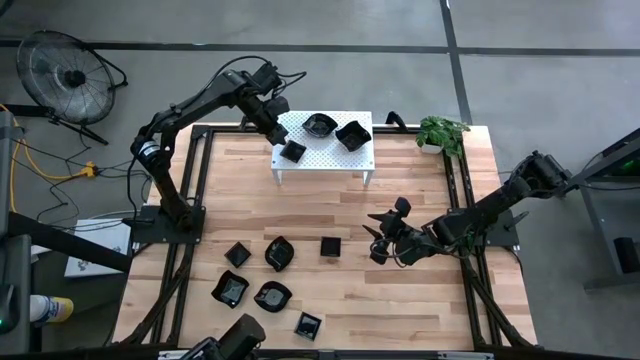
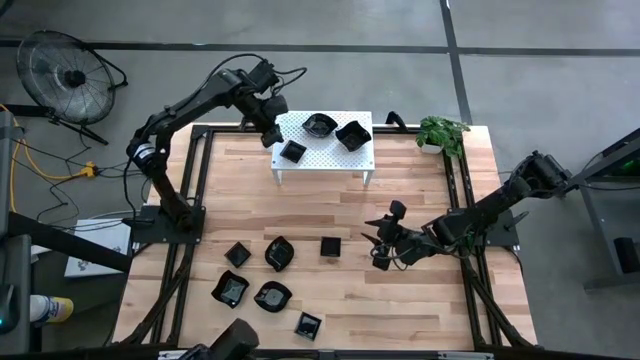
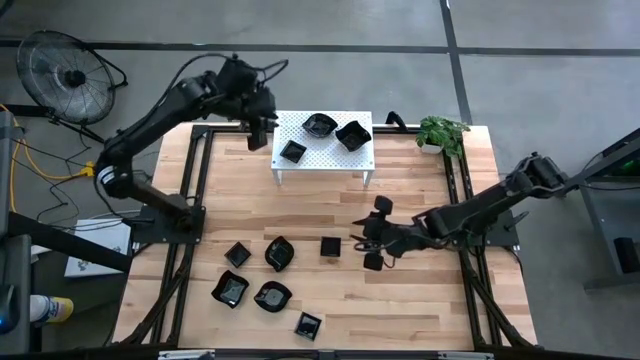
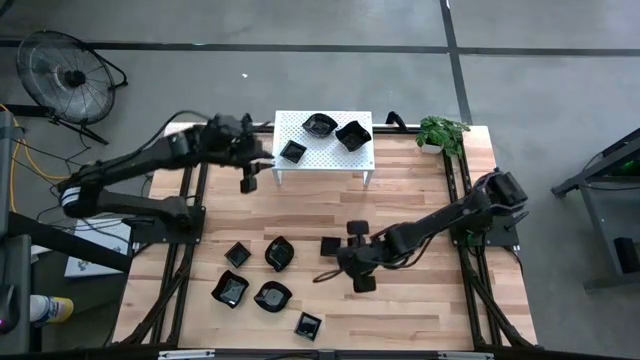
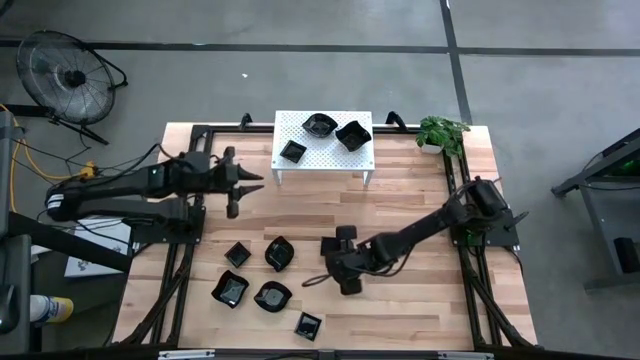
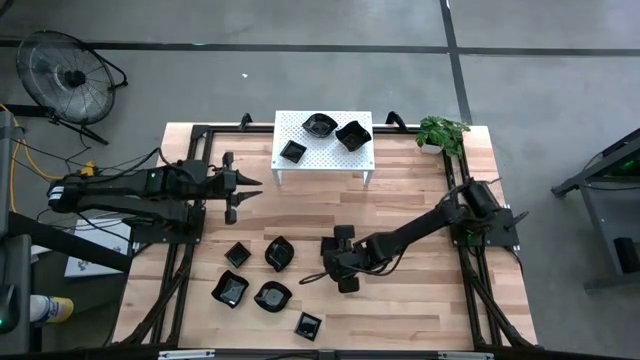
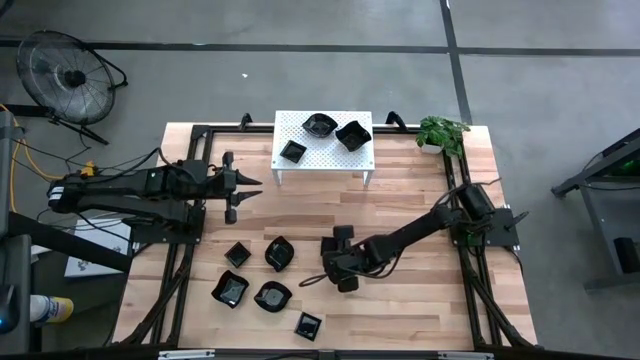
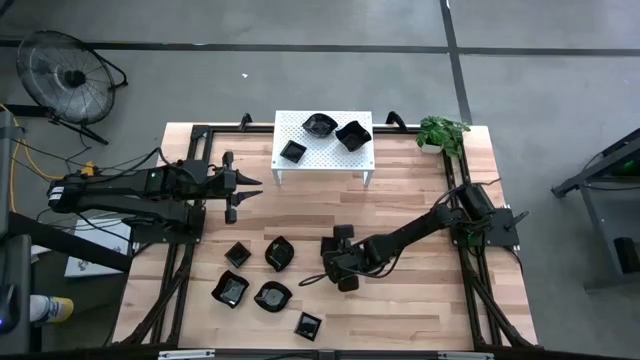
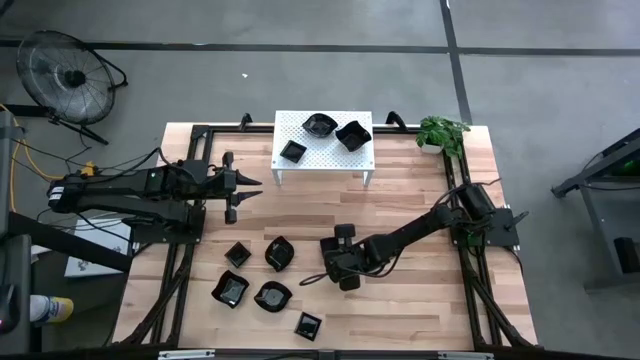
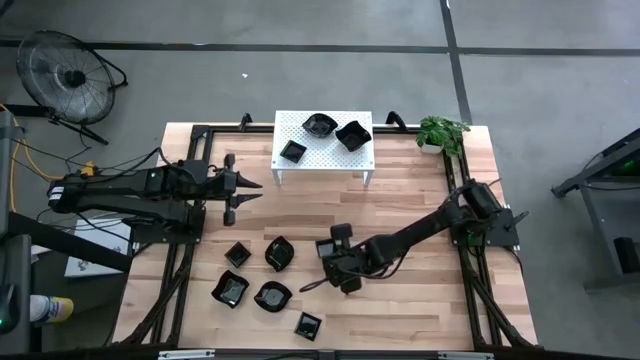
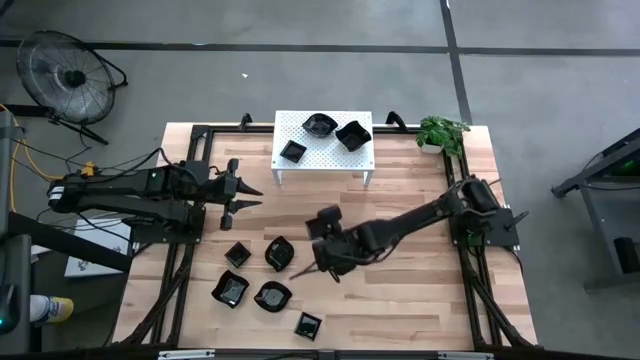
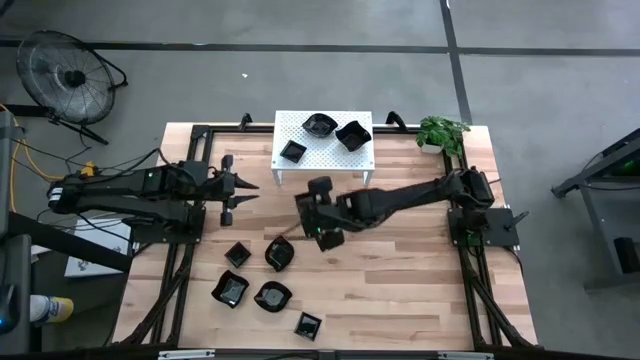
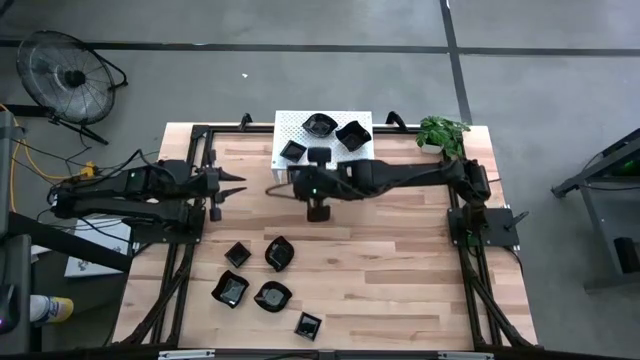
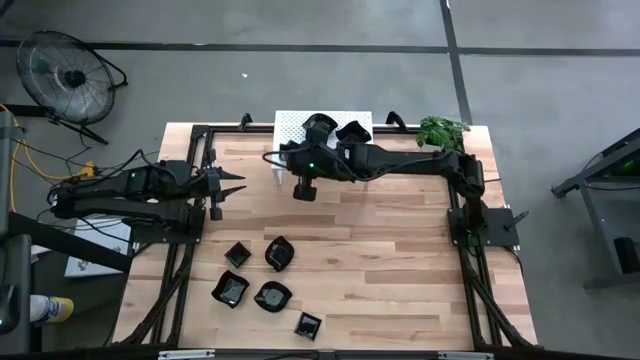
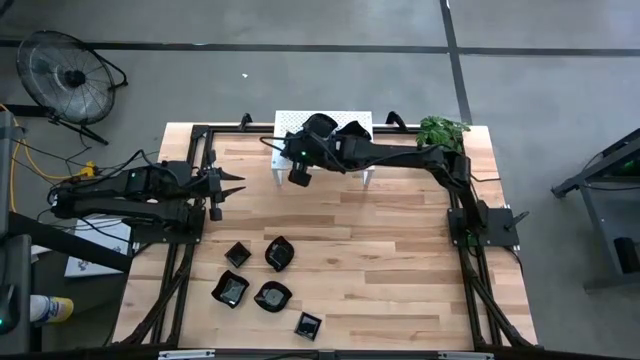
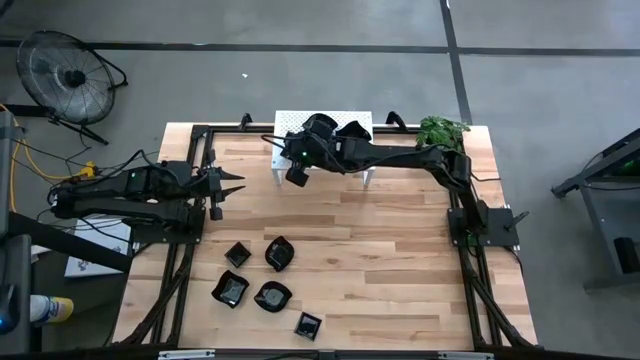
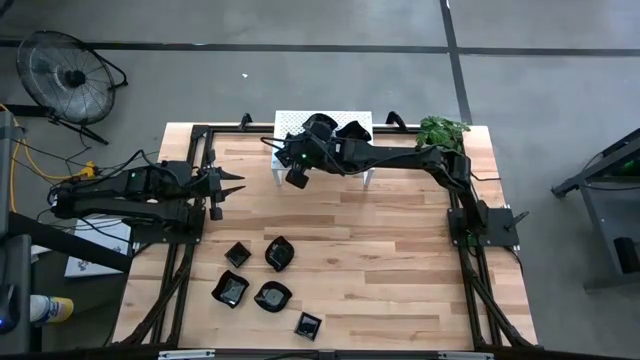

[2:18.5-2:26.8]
Task: Pick & Place Mini shaped plates
Stack the black square plate on top of the black square plate on the shelf

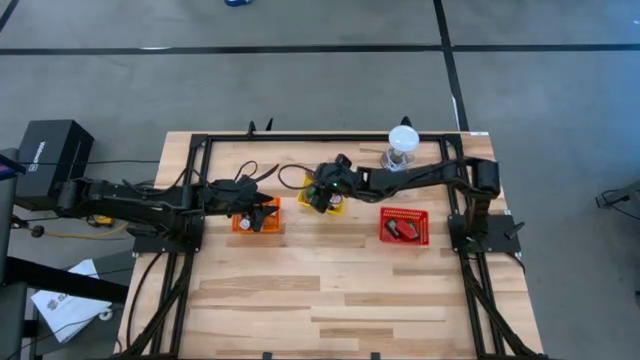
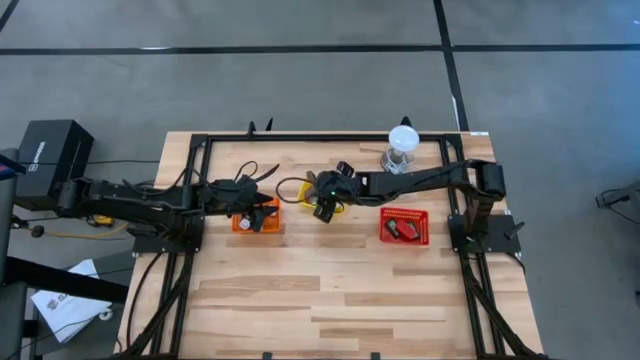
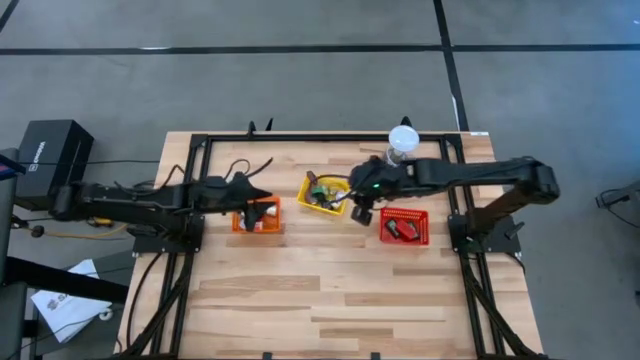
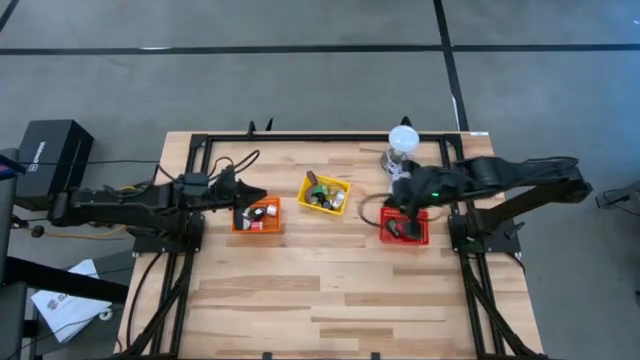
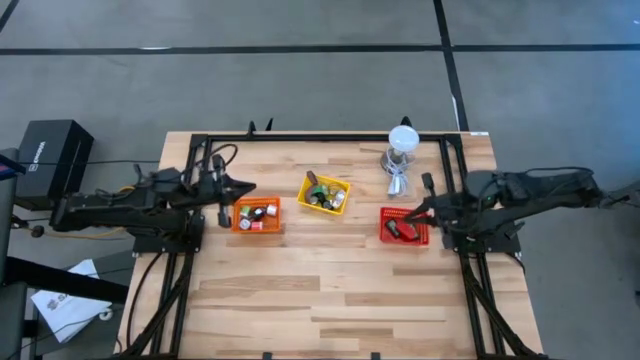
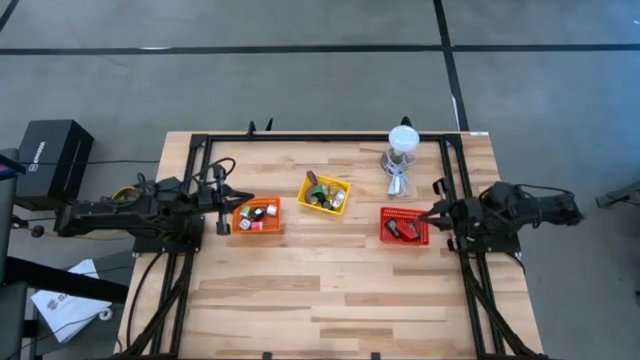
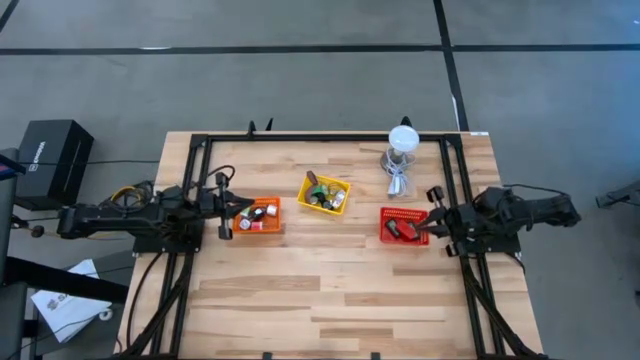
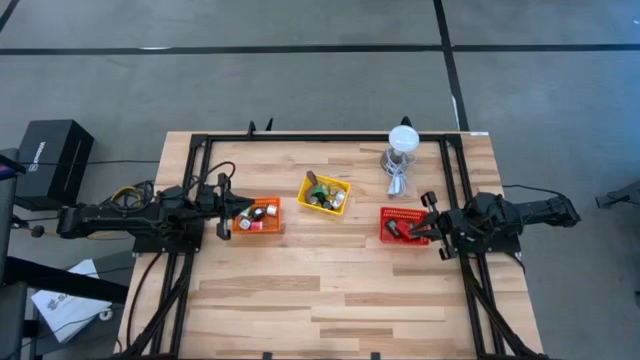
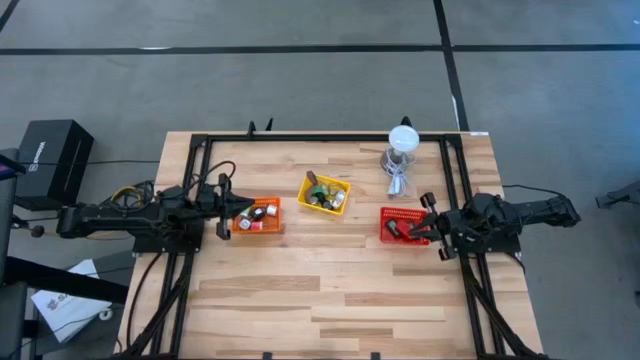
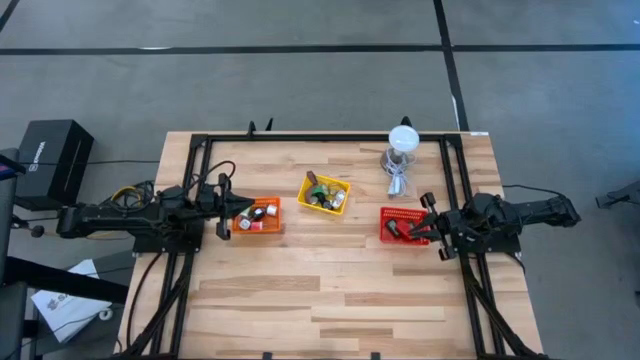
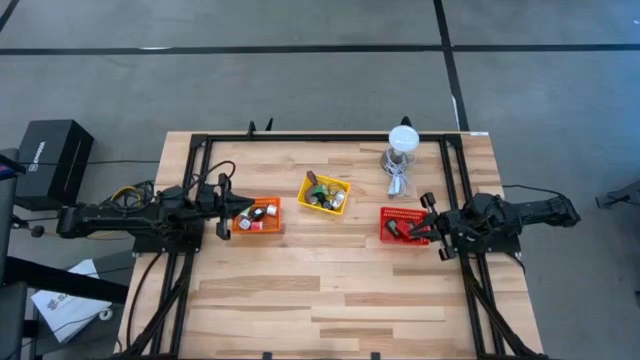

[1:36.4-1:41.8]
Task: Pick & Place Office items
Return to Home Position

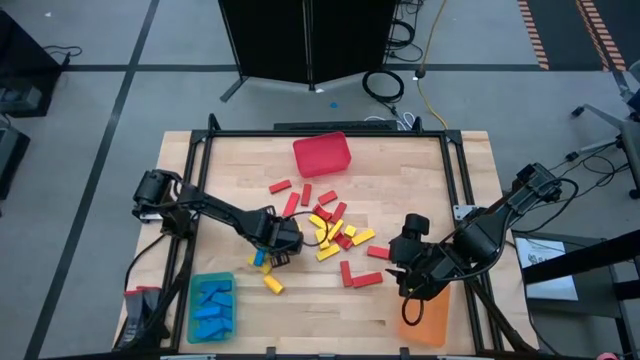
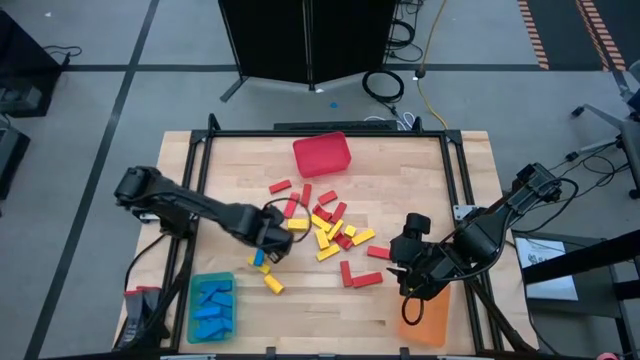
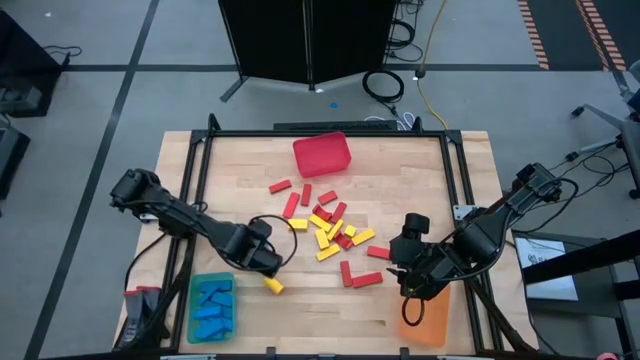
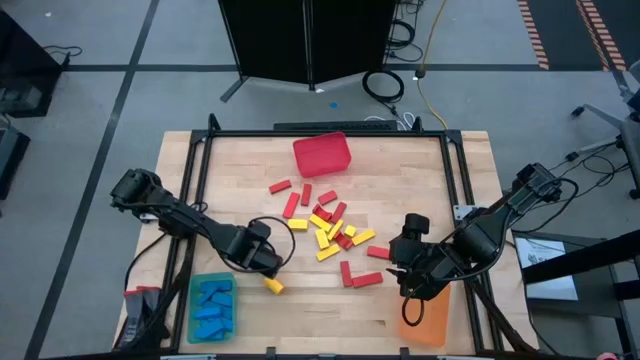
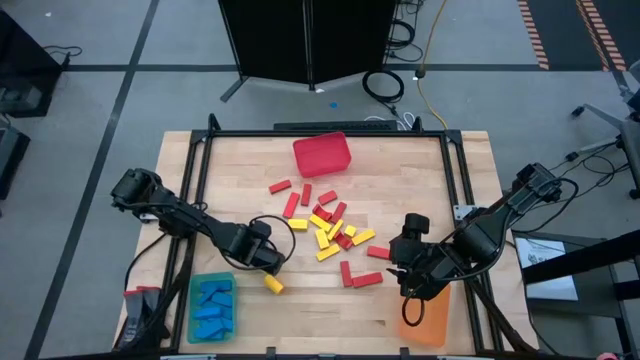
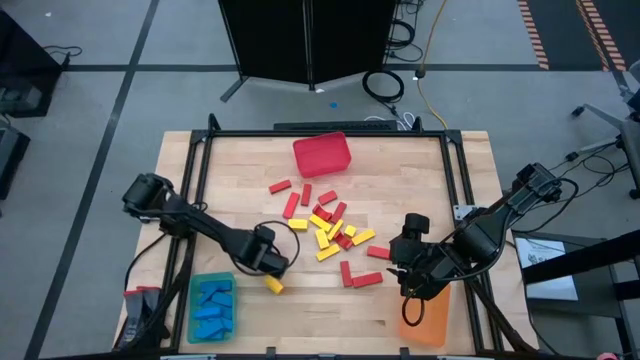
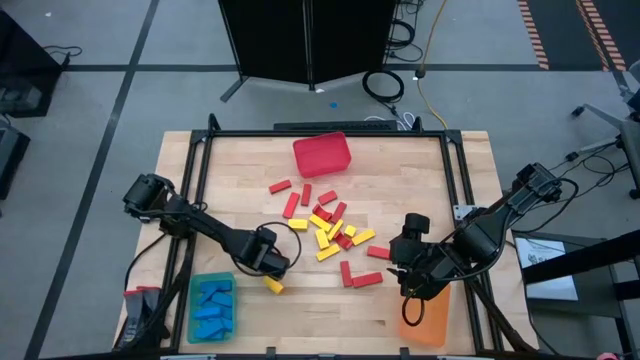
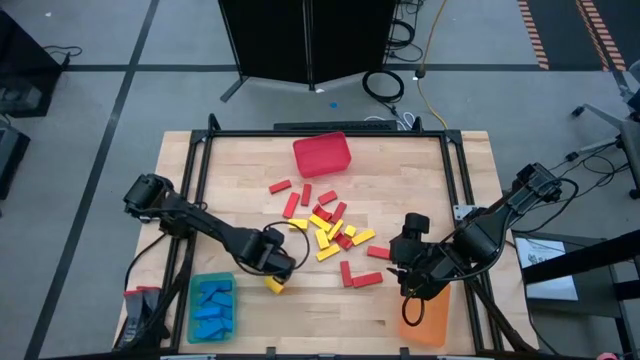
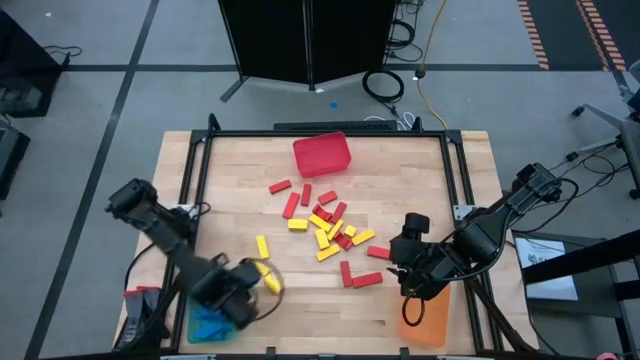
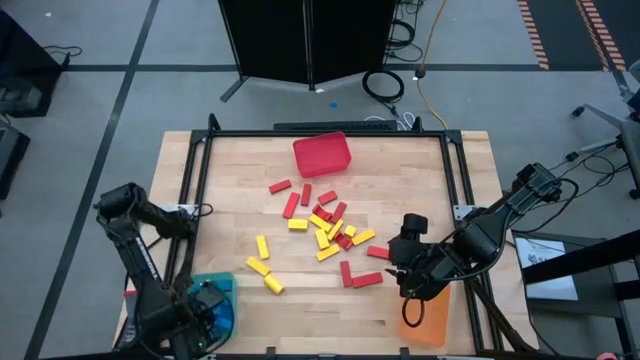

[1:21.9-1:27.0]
Task: Sort blocks
Put the blue block into the green bin

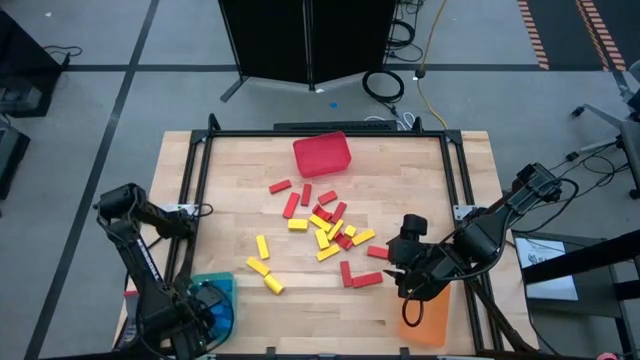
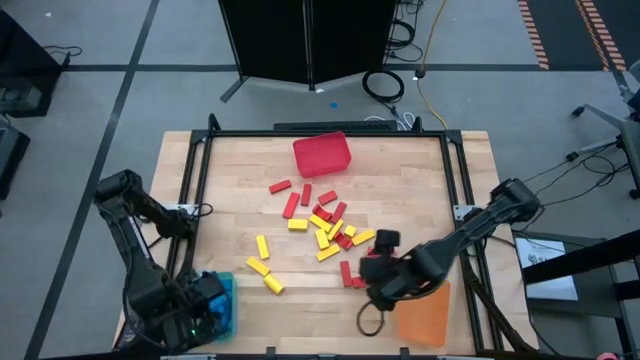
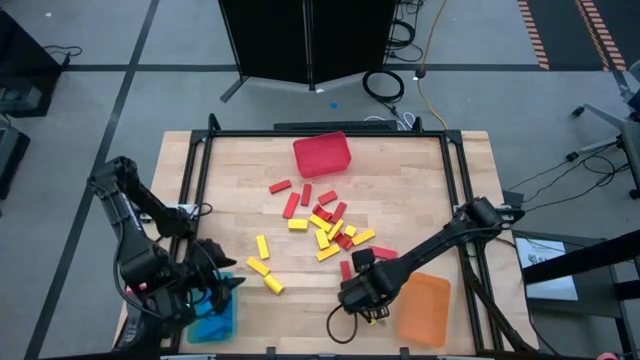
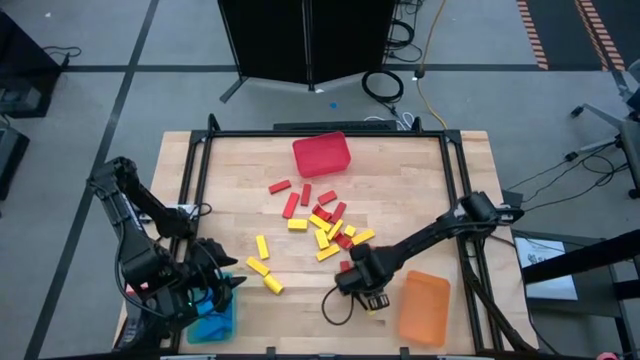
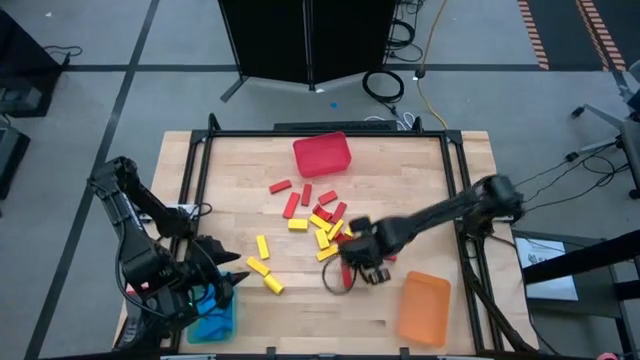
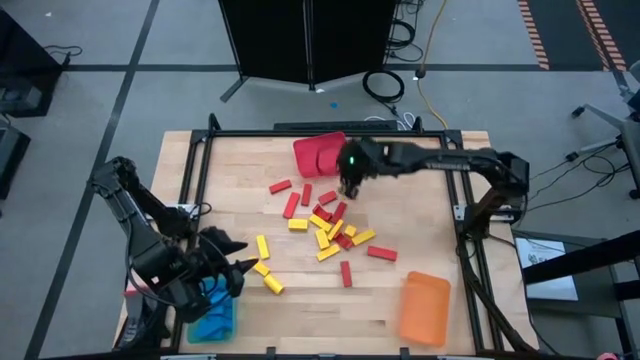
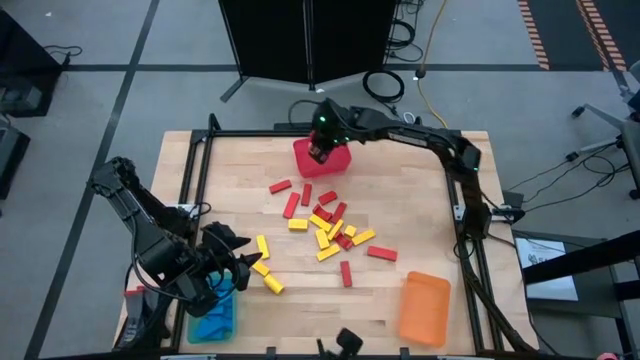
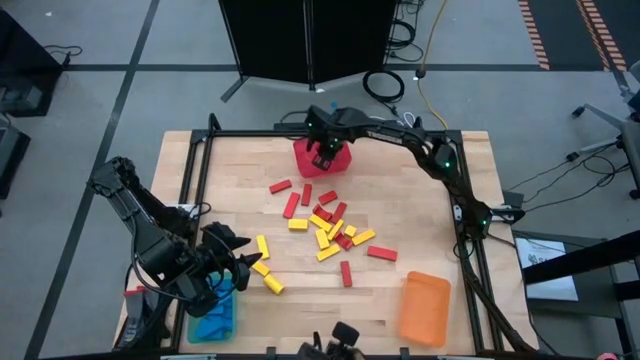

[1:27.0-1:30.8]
Put the red block into the red bin
